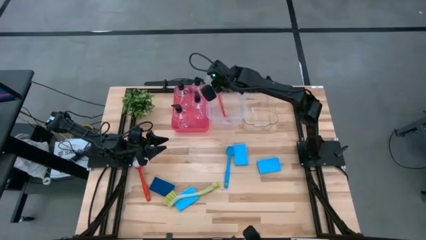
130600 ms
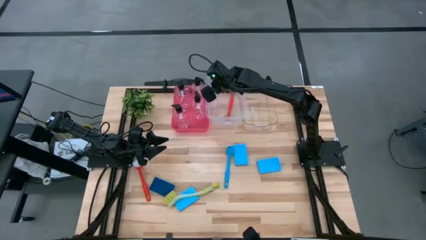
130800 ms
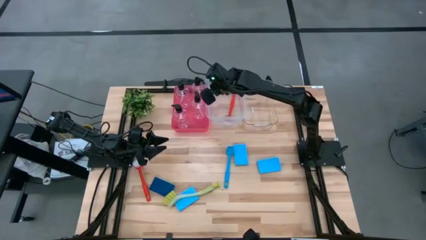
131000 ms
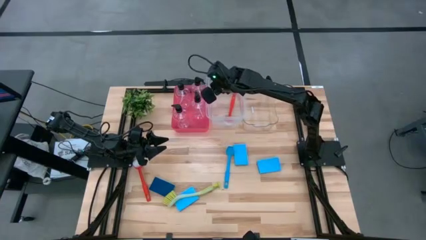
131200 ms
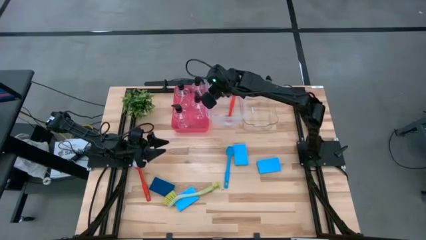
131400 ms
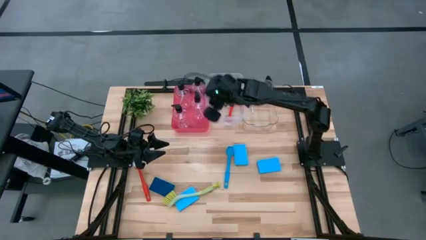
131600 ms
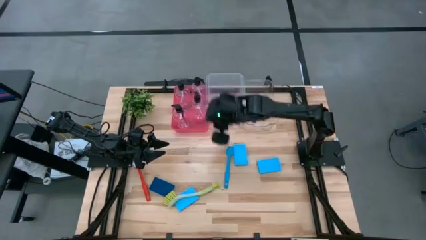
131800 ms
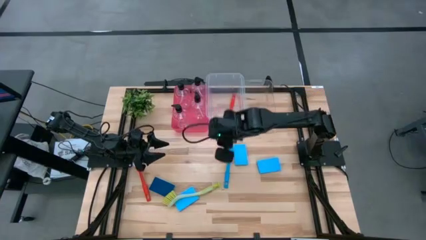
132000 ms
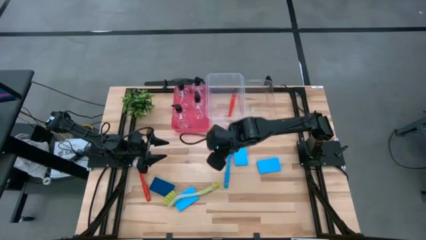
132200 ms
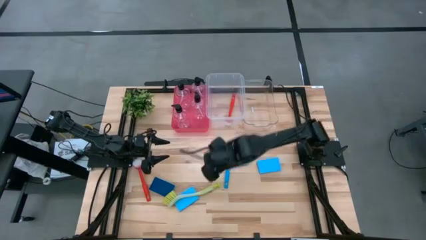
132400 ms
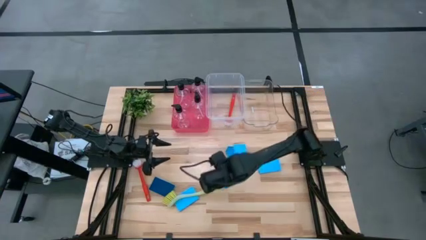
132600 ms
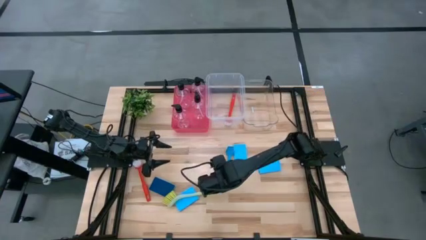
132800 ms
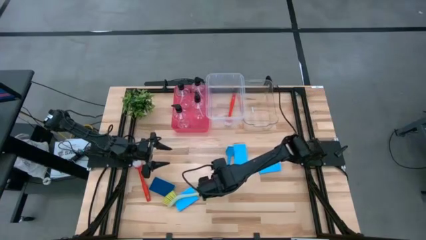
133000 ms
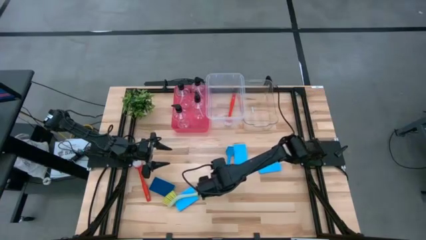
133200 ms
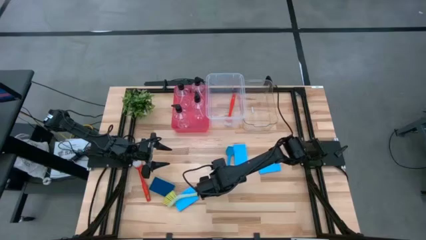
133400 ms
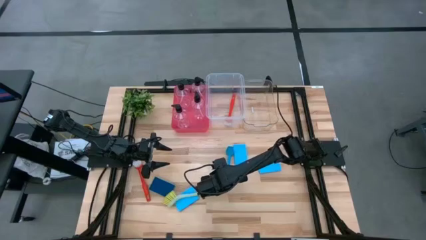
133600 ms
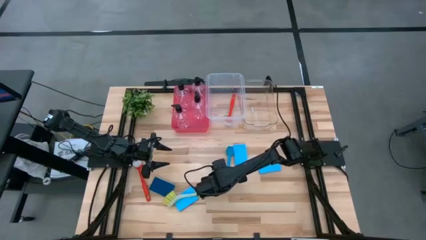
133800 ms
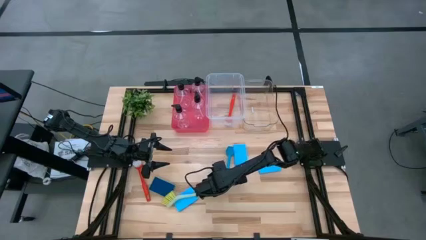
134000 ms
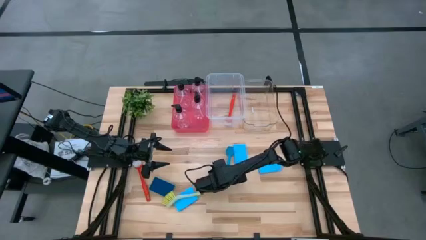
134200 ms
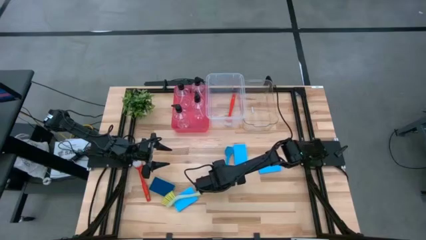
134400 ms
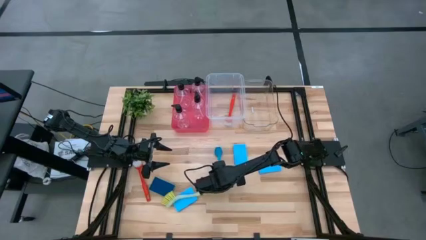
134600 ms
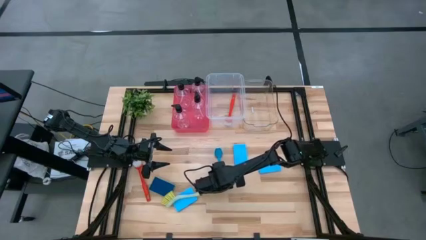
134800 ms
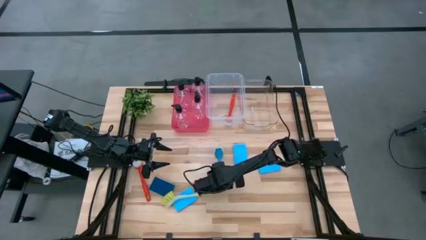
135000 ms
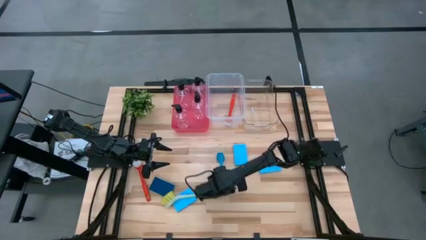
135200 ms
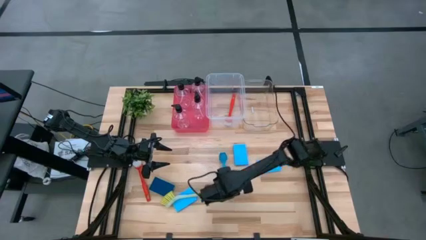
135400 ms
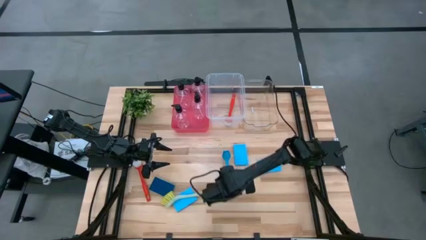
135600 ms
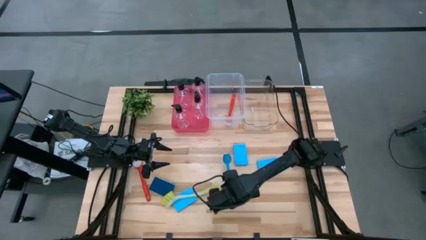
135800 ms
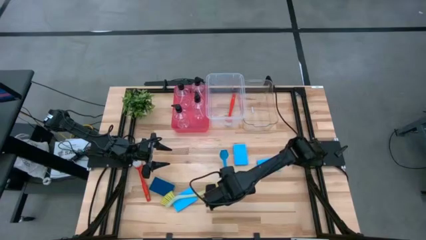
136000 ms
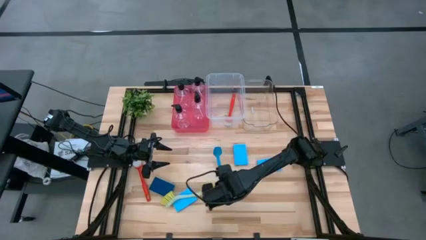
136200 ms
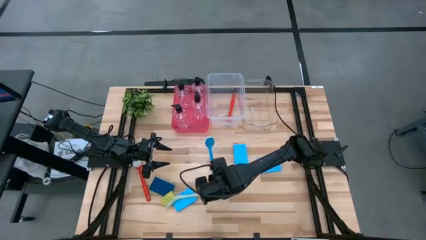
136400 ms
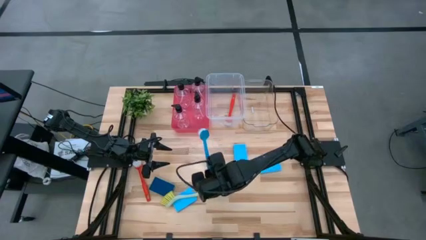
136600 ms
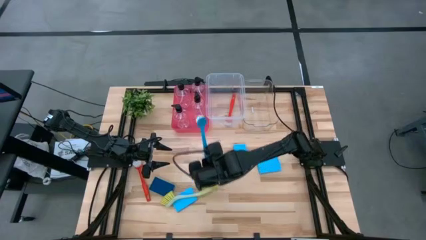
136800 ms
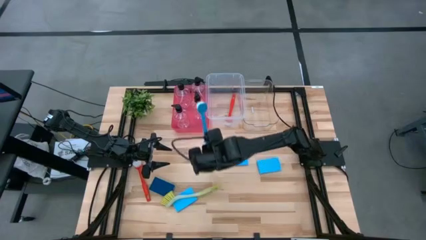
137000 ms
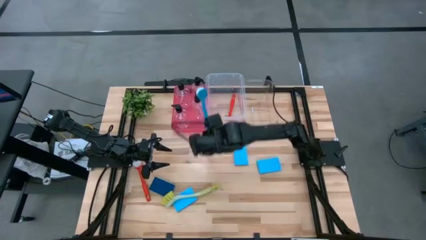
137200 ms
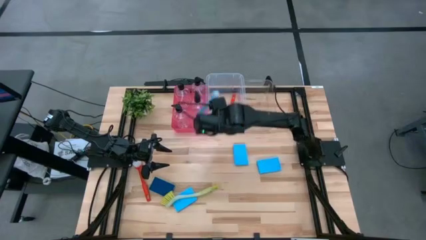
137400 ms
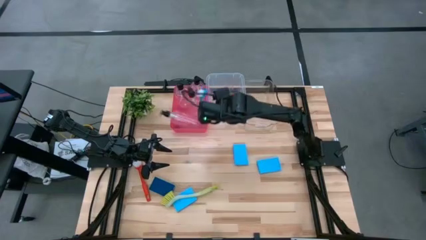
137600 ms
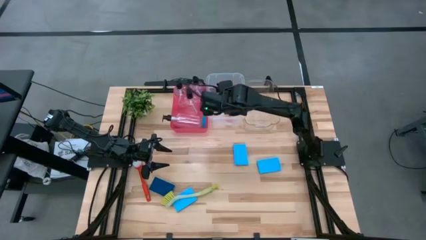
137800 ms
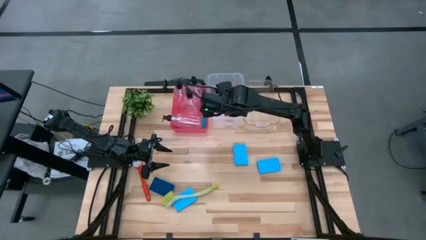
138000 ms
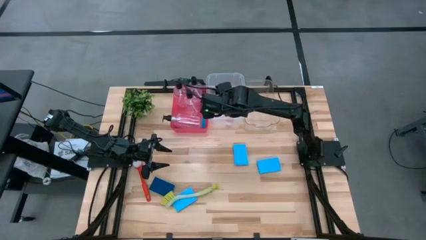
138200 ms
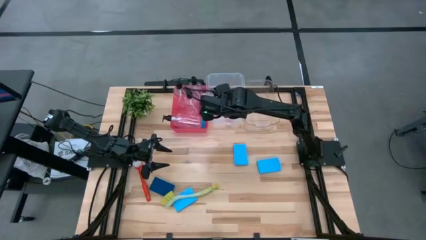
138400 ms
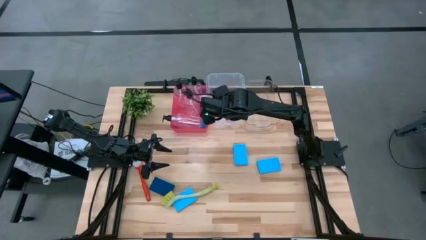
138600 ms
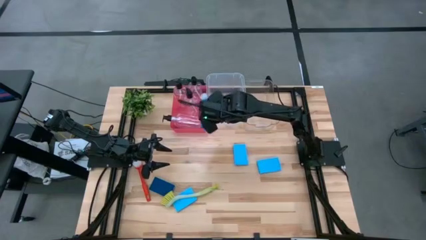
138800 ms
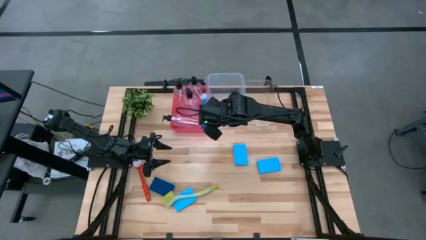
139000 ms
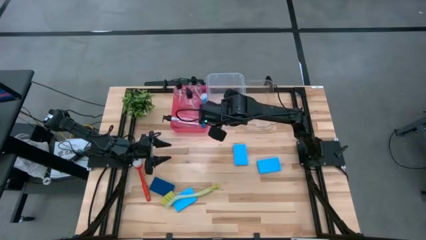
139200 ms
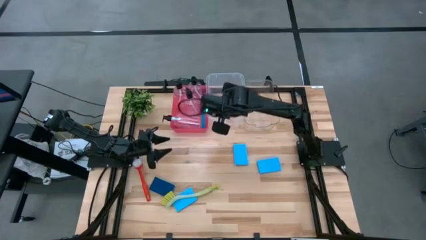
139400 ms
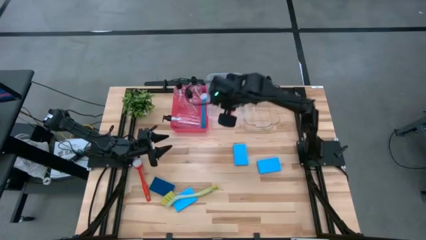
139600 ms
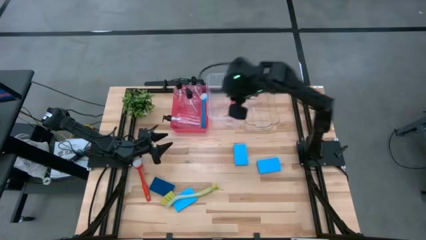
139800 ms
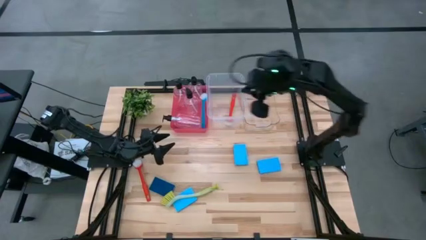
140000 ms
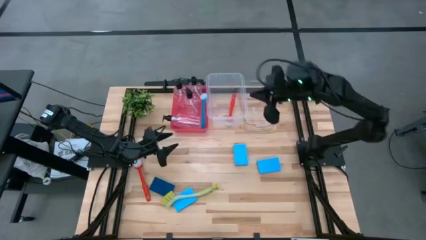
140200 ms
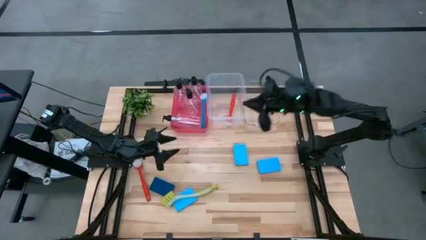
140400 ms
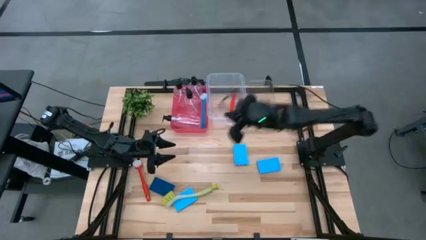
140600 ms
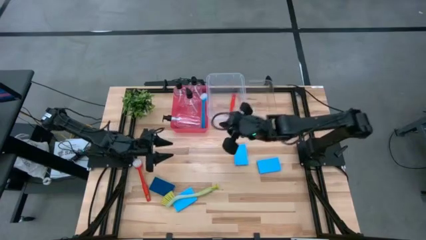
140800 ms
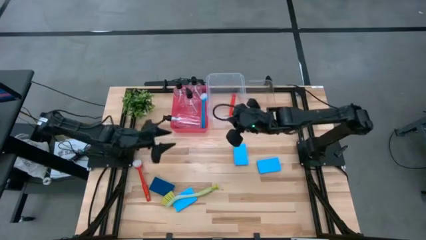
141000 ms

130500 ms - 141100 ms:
Task: Pick & Place Kitchen Sink Supplies
Put the blue dishwashing brush into the red bin

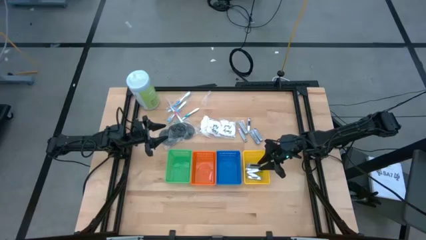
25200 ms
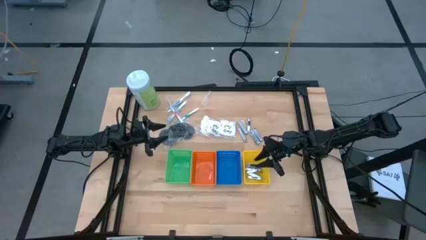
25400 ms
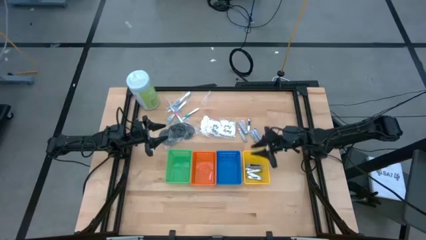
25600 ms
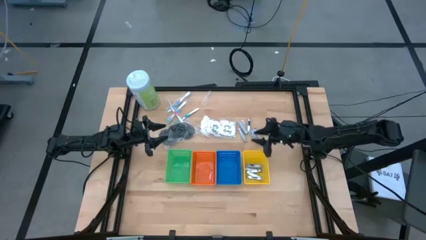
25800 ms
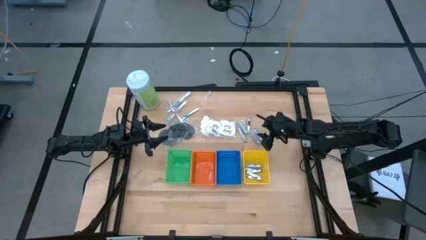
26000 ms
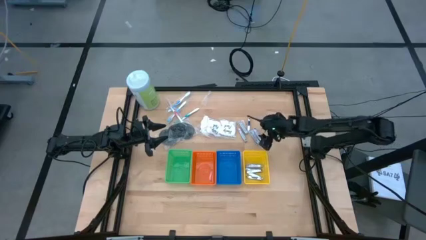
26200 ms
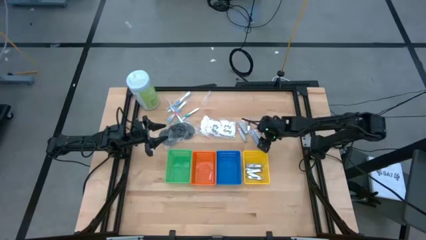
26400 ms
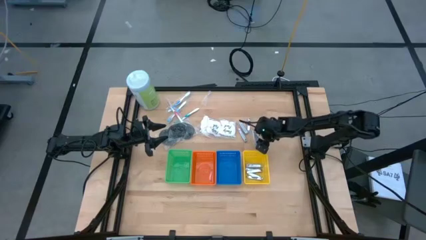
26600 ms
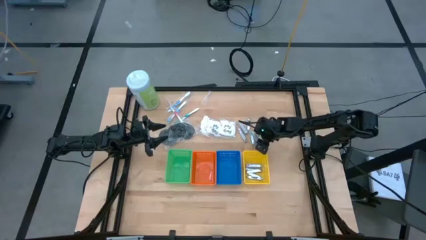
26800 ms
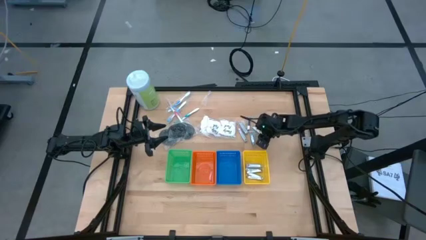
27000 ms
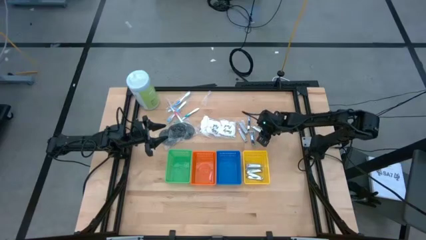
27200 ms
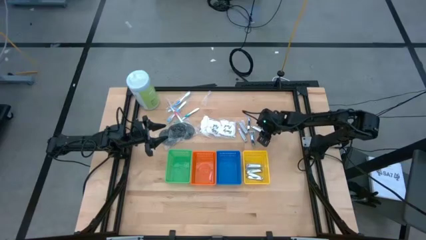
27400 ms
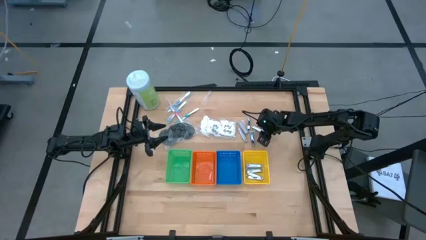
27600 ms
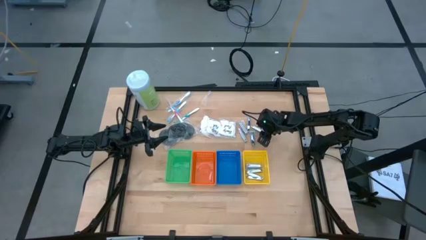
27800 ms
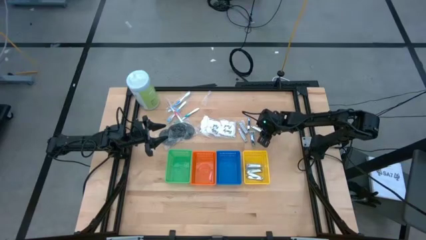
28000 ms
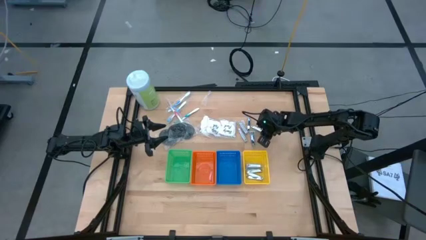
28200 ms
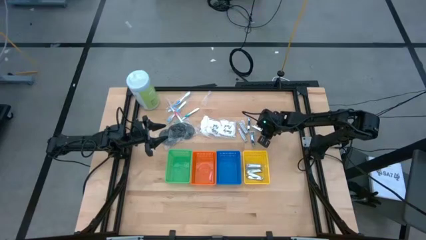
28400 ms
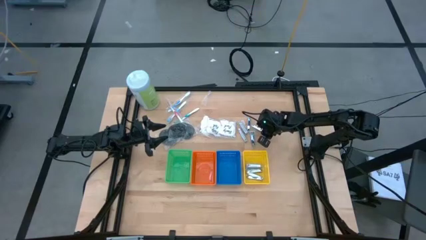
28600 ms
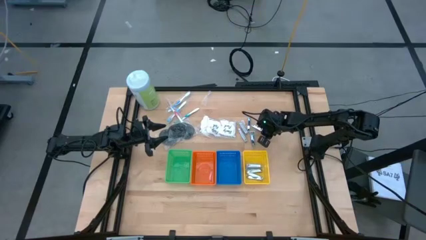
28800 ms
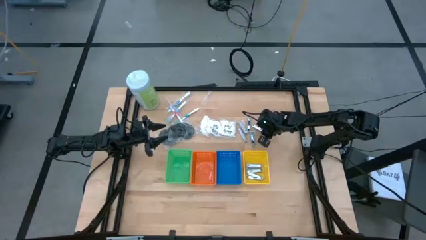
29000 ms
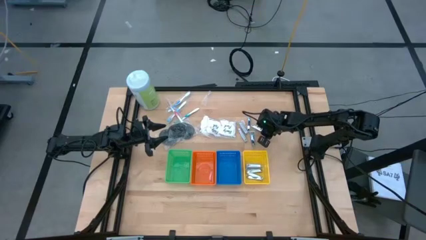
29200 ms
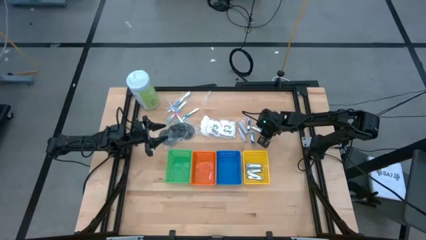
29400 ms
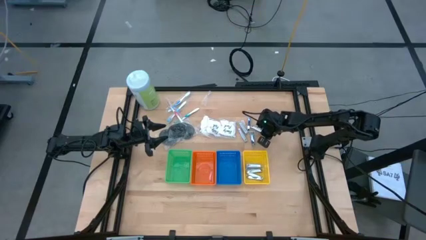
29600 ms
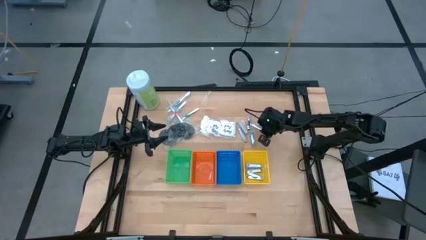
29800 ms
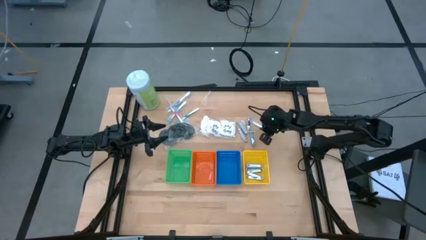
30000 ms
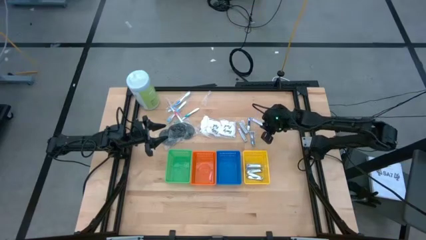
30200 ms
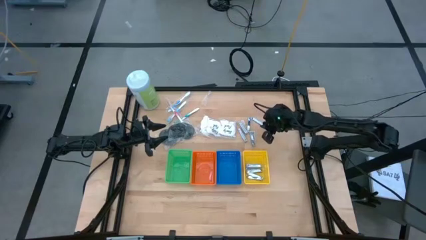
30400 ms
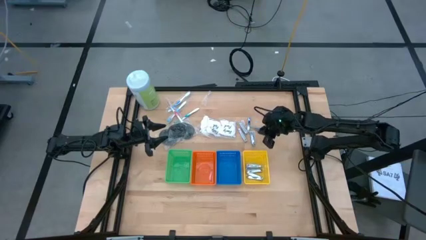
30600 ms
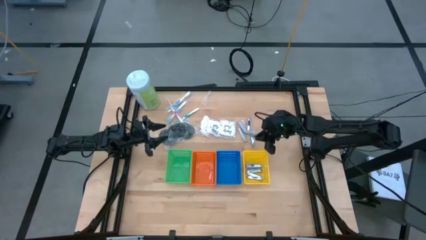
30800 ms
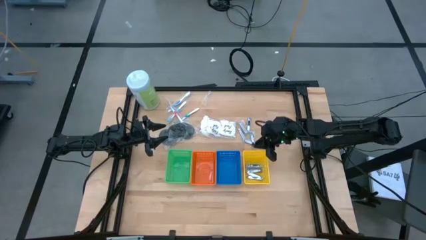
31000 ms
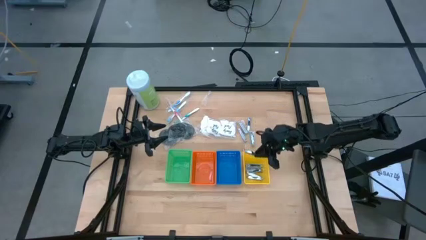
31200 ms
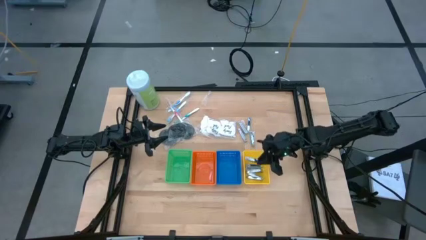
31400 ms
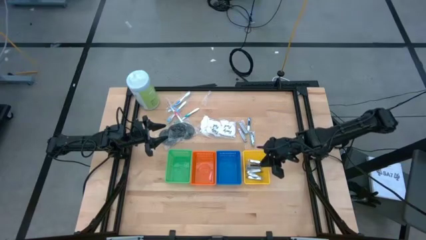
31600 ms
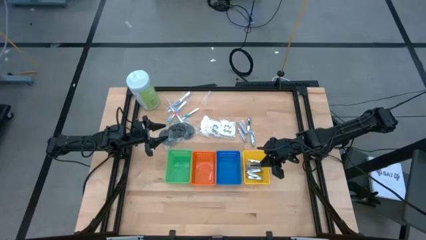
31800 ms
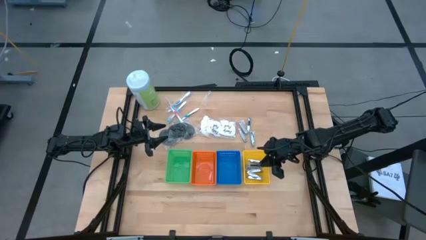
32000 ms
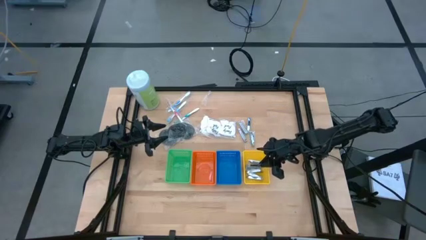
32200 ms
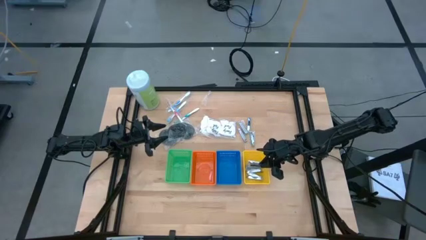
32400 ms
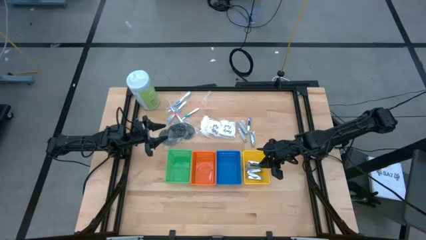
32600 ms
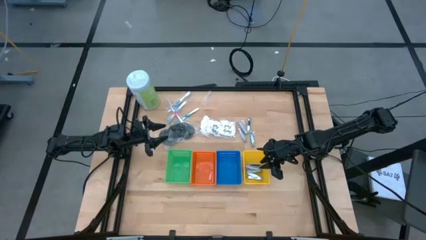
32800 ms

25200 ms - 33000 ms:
Task: Pick & Place Travel size toiletries
Put the silver nail cutter into the yellow basket
